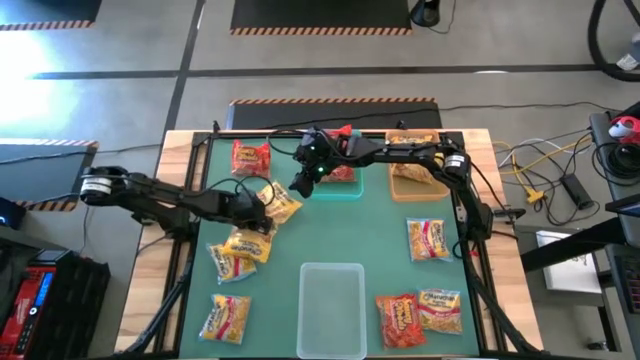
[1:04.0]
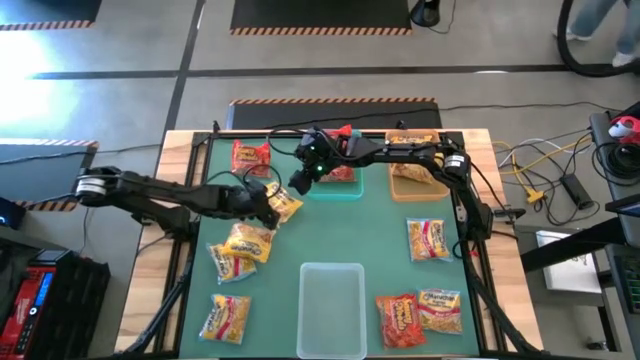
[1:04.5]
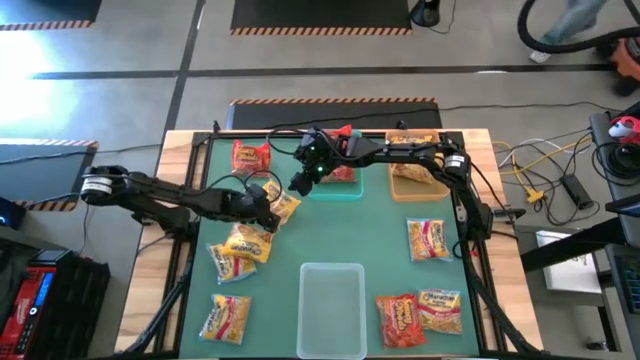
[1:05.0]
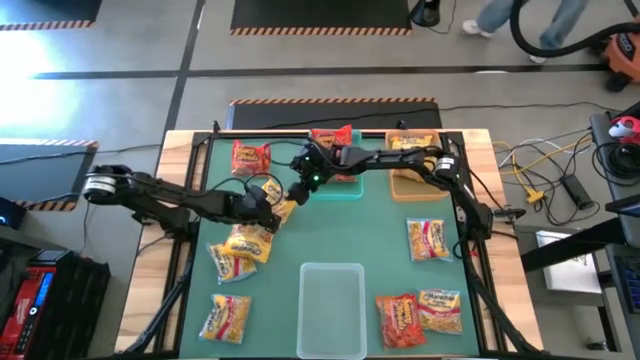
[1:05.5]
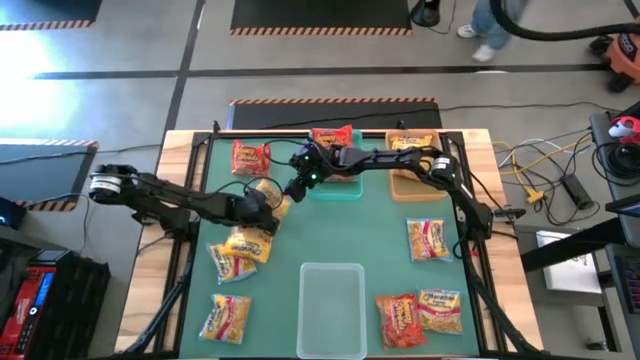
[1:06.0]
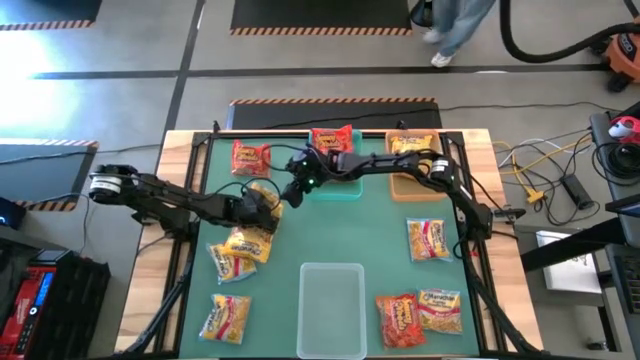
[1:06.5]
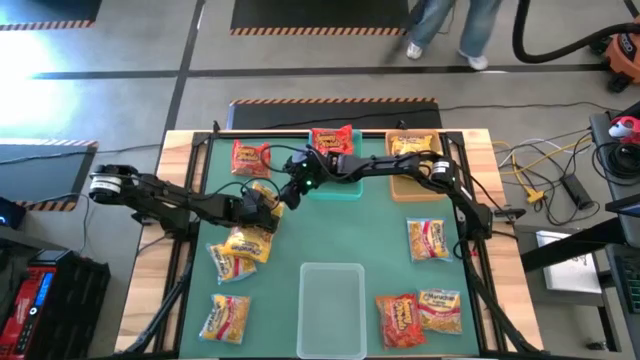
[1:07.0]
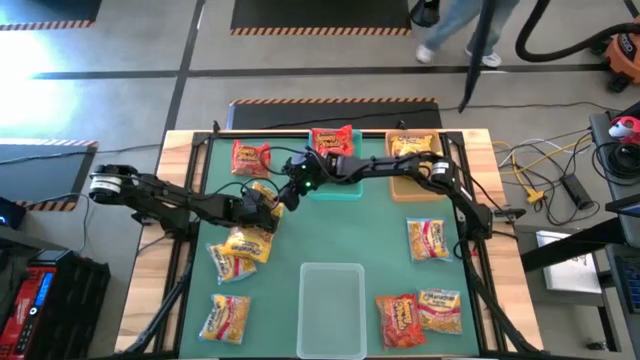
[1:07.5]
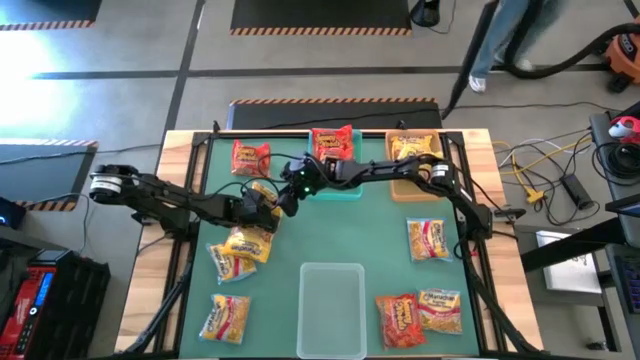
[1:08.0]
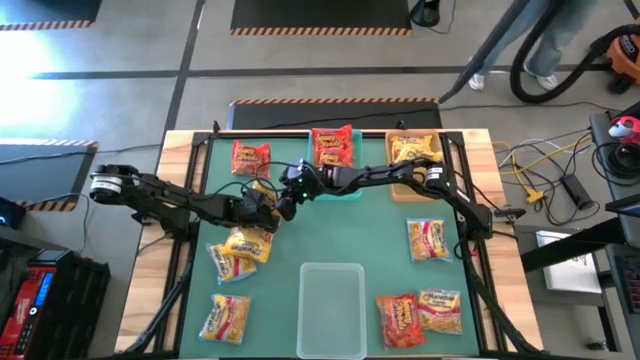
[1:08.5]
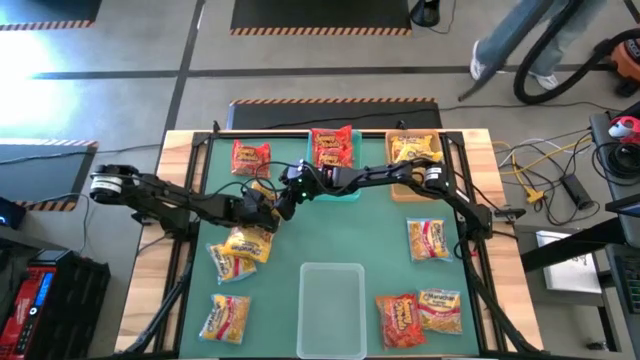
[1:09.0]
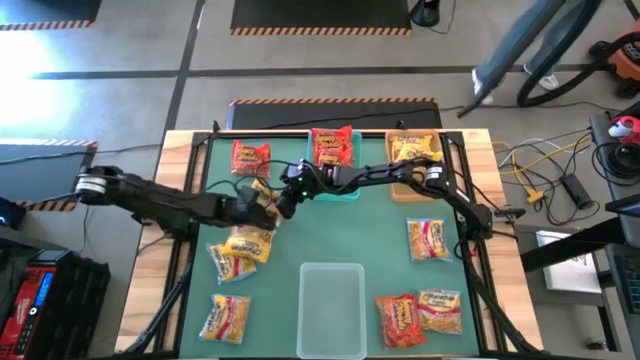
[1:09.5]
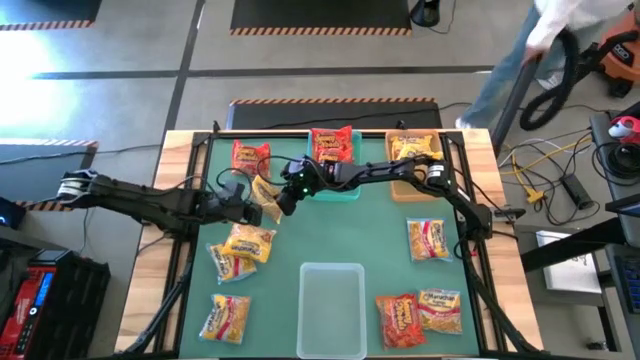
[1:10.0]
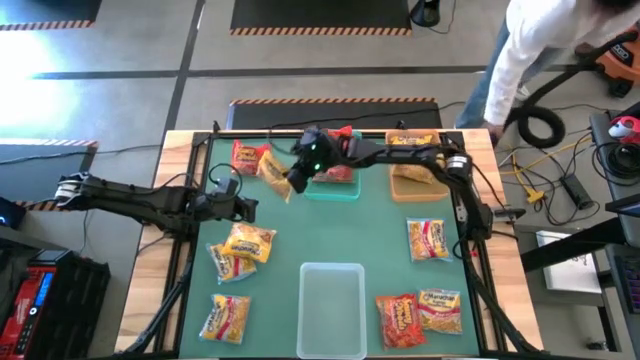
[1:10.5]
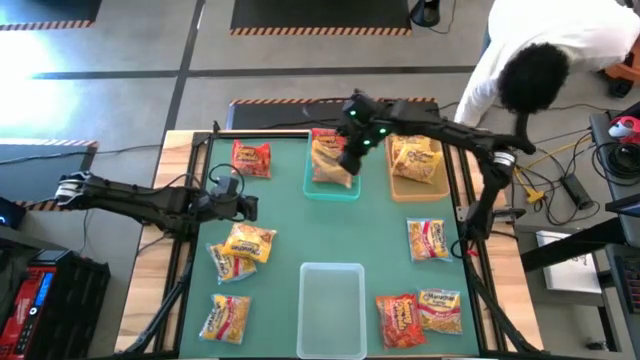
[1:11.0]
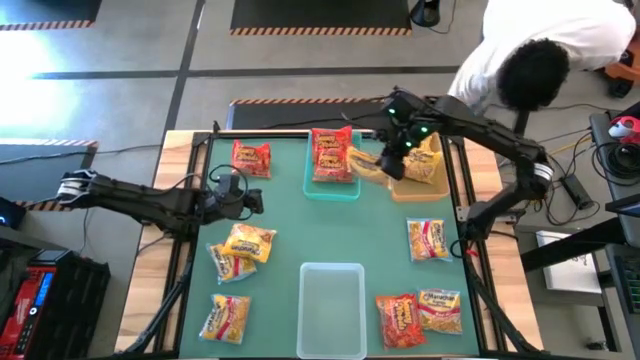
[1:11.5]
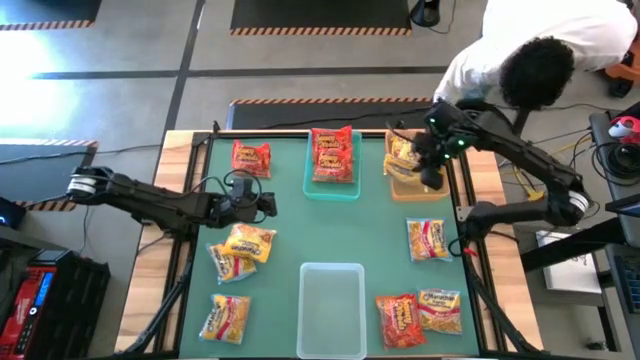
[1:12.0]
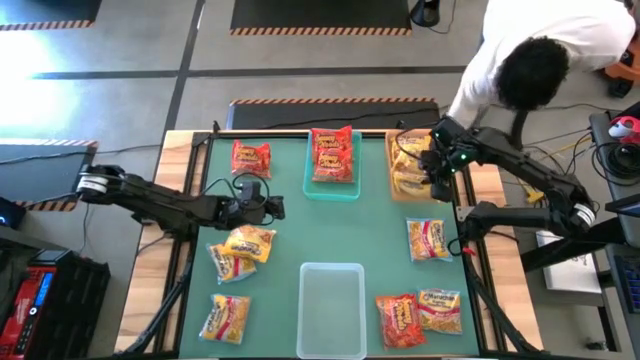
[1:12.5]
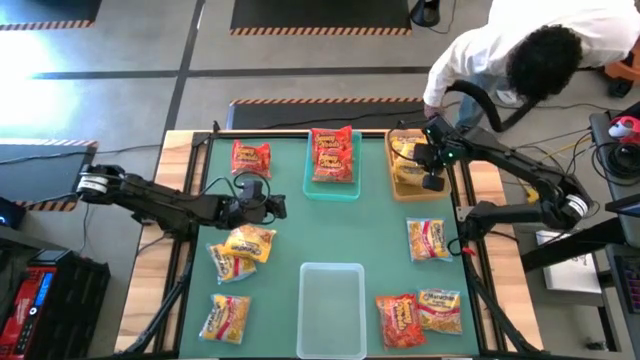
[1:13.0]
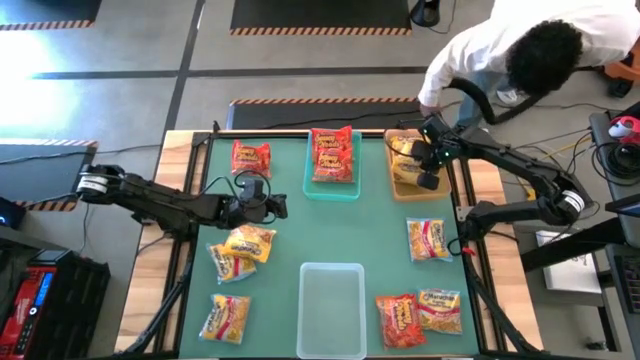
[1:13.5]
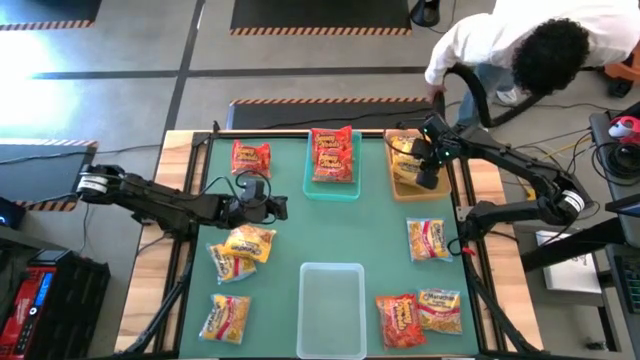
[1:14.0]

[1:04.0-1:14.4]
Task: Sort Maruchan noodles
Put the yellow noodle pack into the orange bin

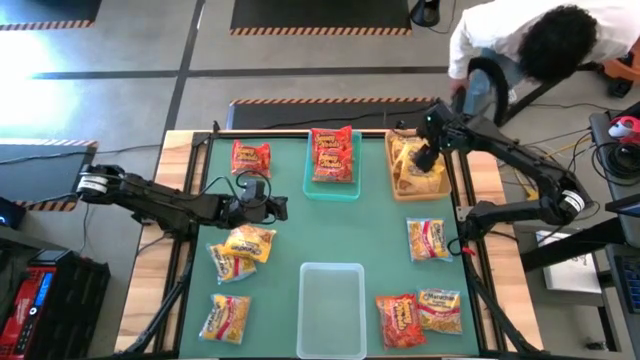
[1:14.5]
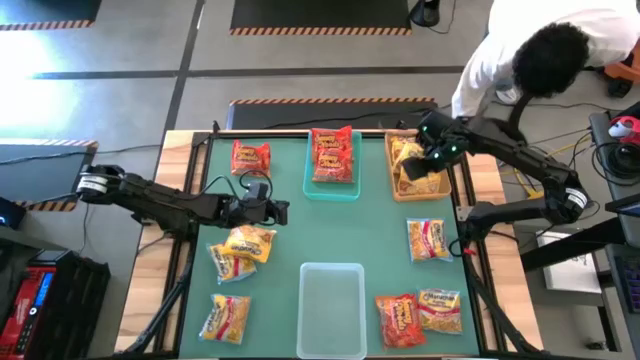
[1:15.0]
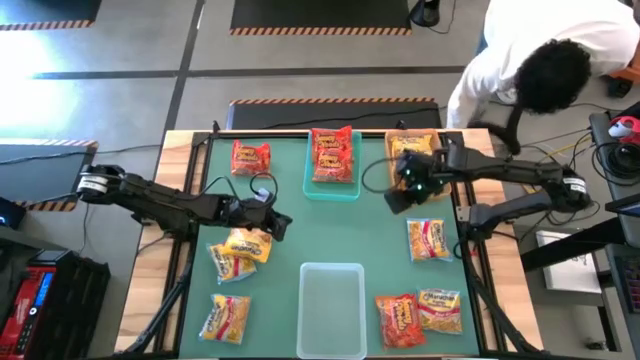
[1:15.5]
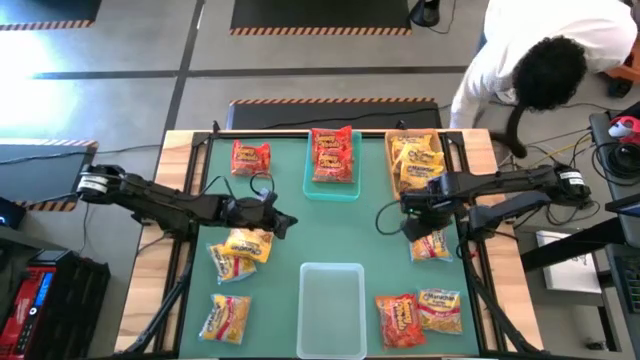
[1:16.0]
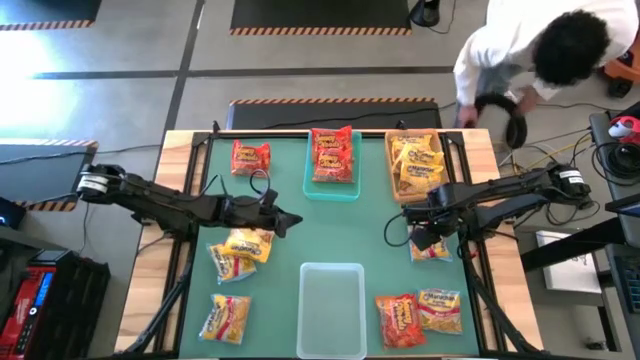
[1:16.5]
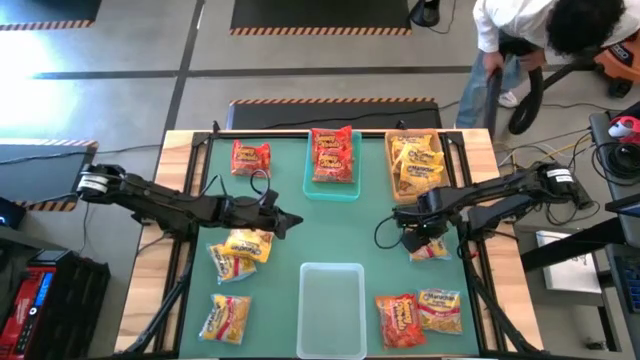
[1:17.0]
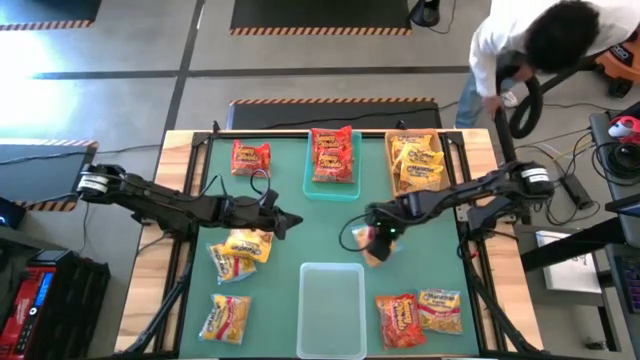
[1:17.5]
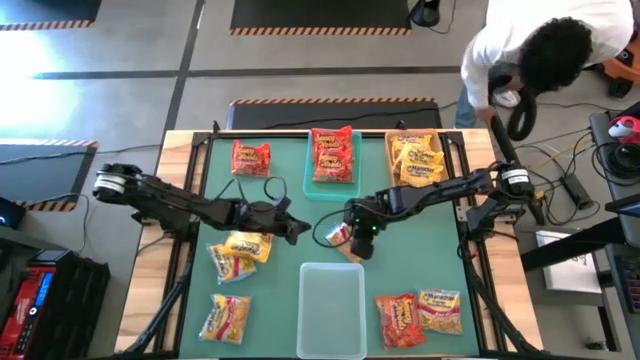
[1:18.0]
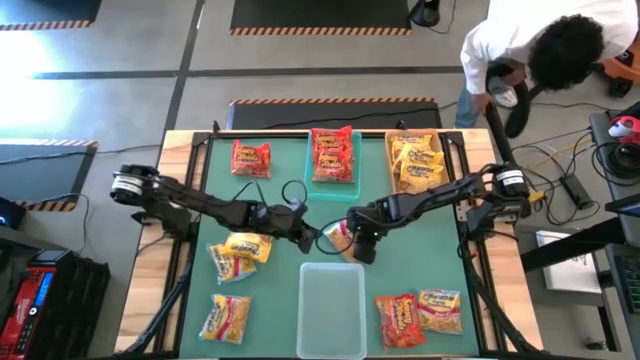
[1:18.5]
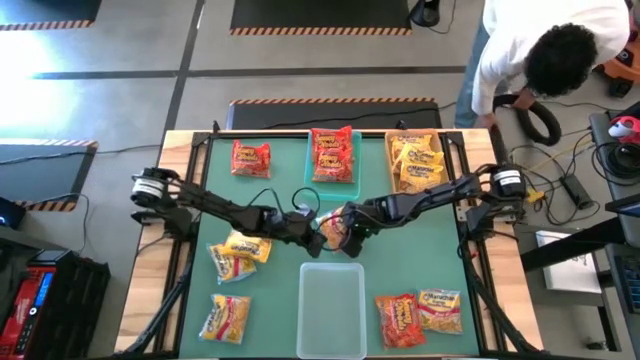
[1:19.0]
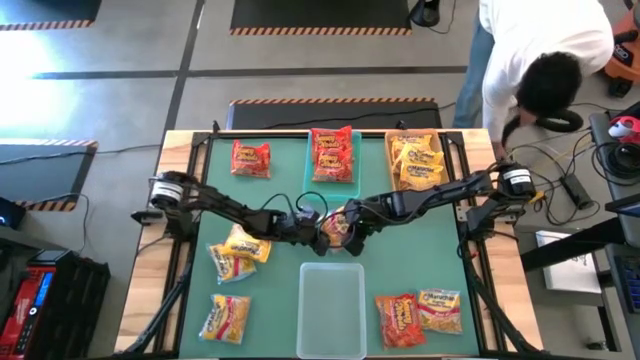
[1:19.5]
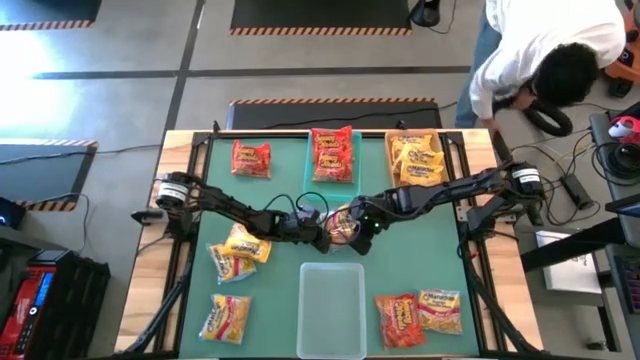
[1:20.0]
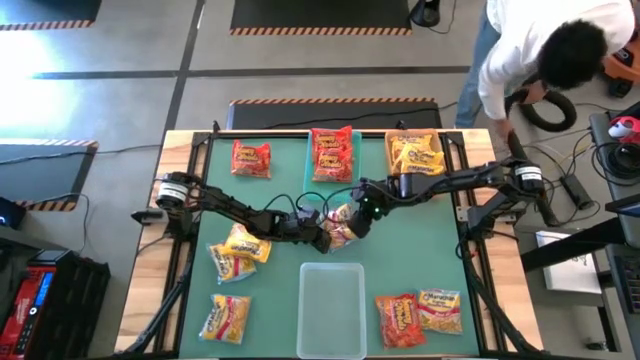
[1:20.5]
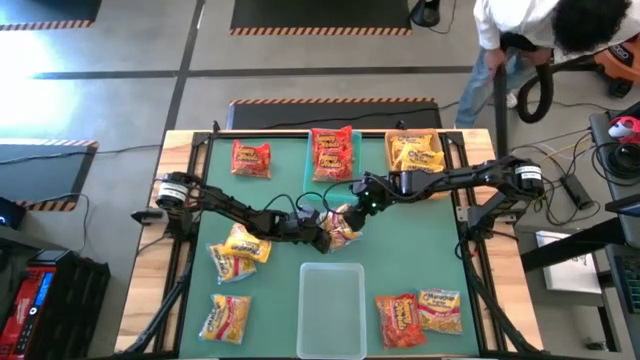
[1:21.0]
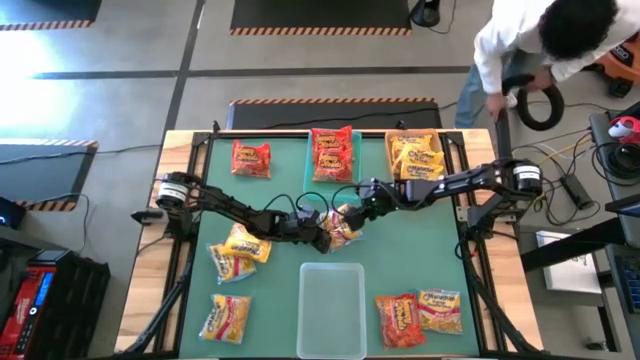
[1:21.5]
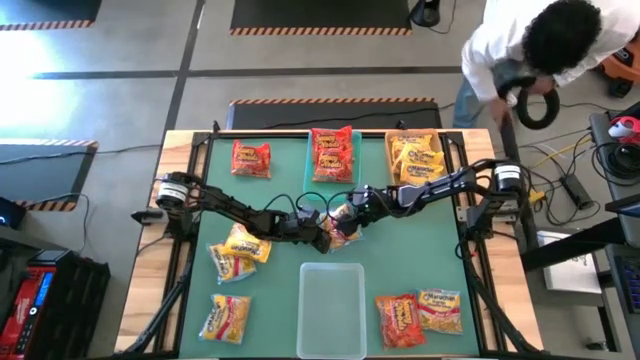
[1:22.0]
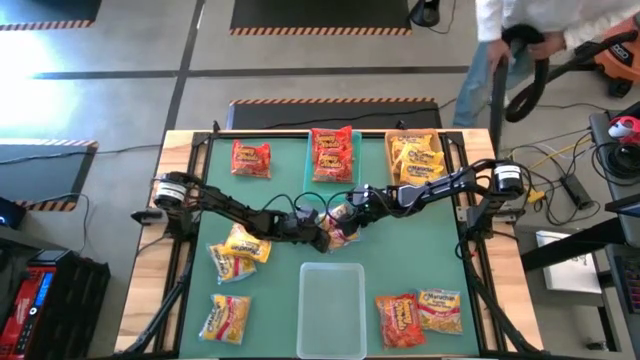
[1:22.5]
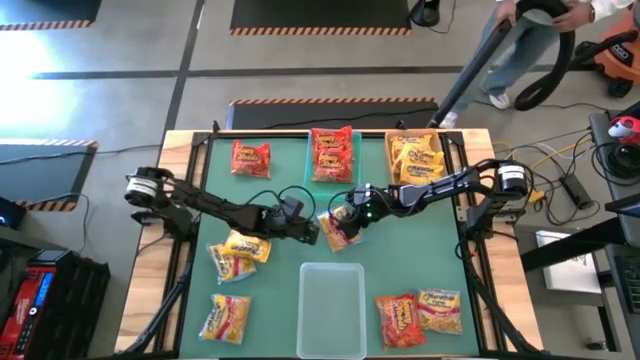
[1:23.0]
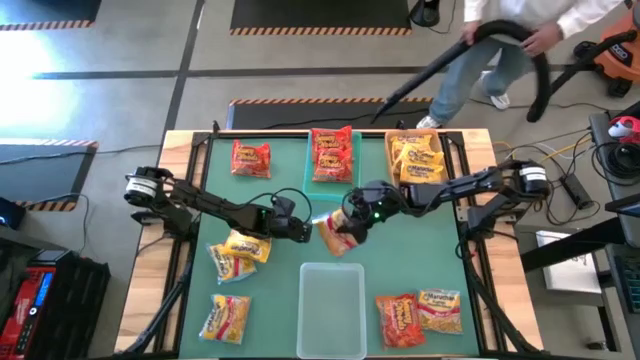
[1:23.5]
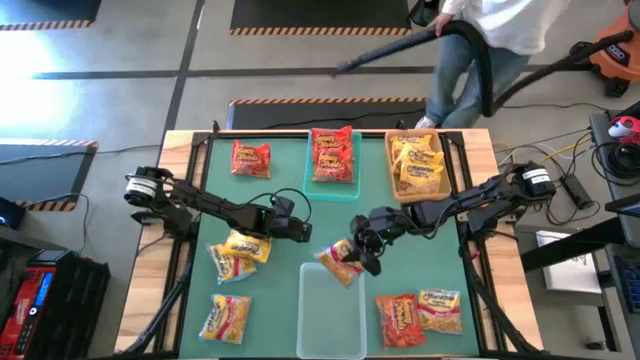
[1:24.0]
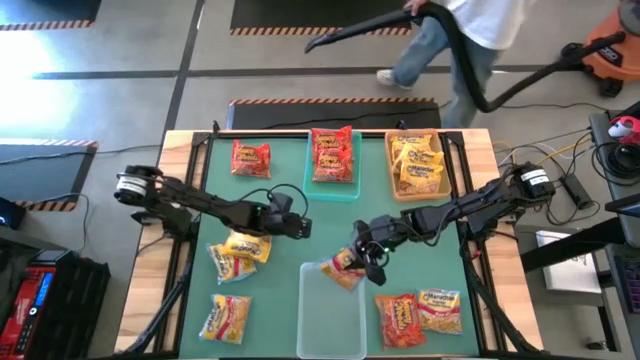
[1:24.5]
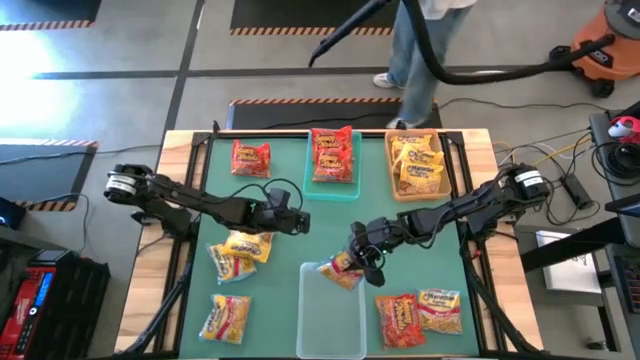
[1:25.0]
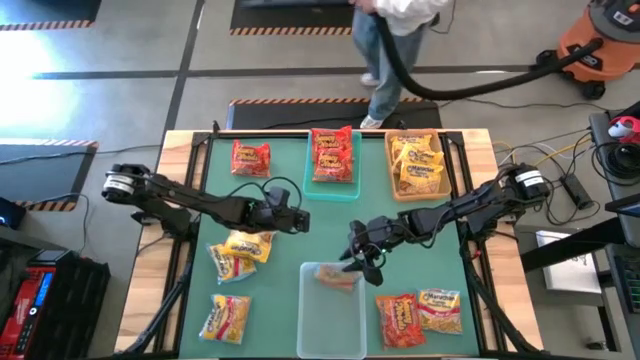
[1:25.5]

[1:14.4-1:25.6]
Put the blue noodle pack into the transparent bin
